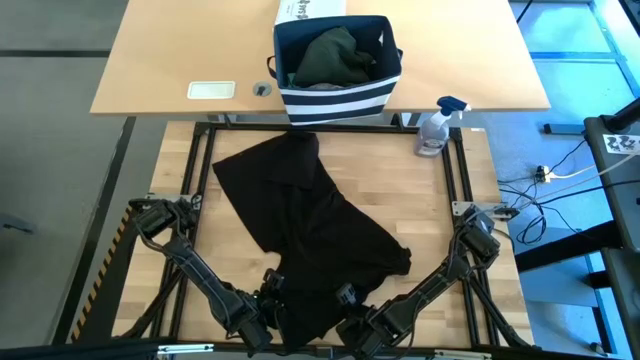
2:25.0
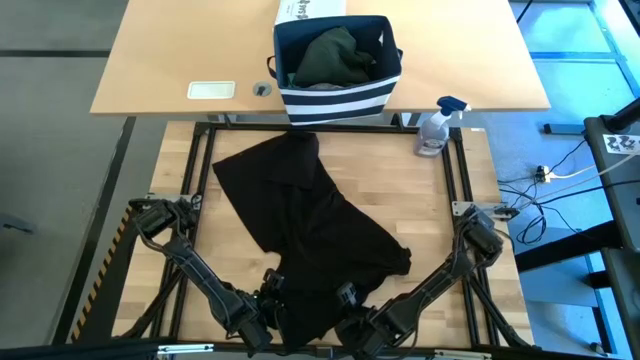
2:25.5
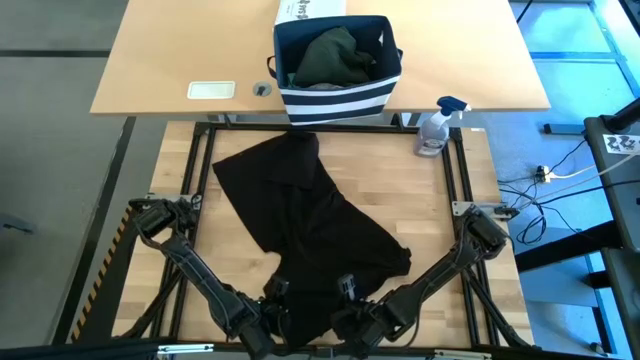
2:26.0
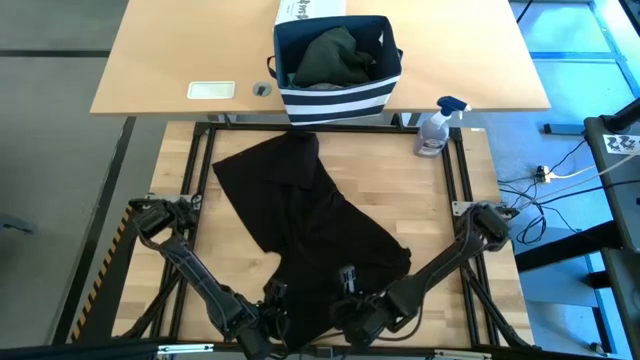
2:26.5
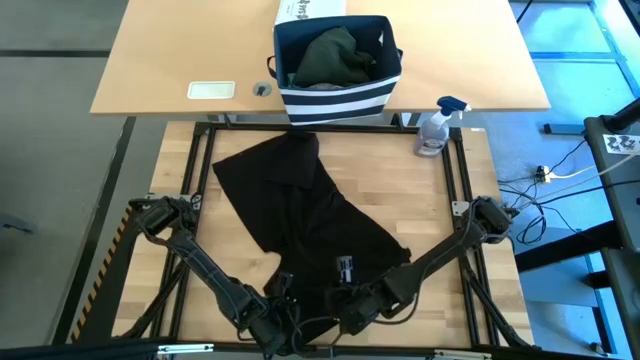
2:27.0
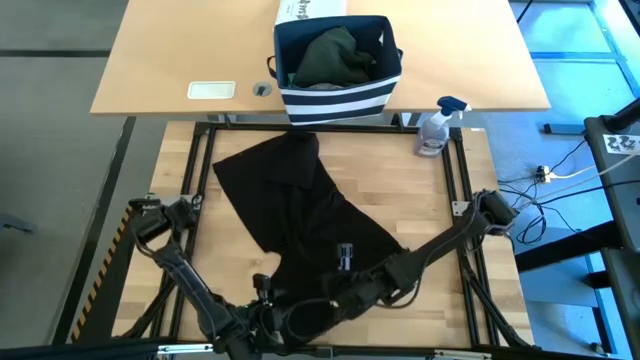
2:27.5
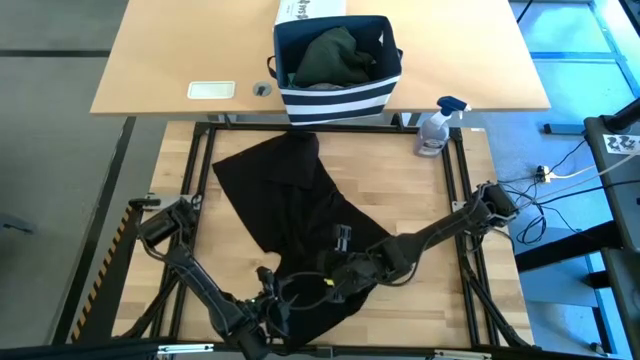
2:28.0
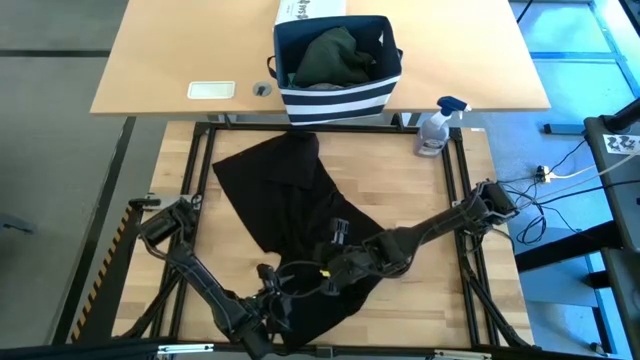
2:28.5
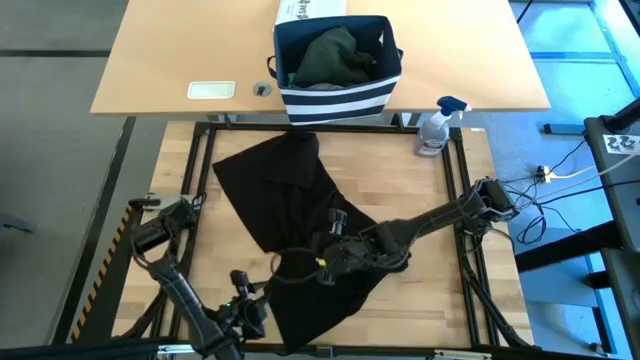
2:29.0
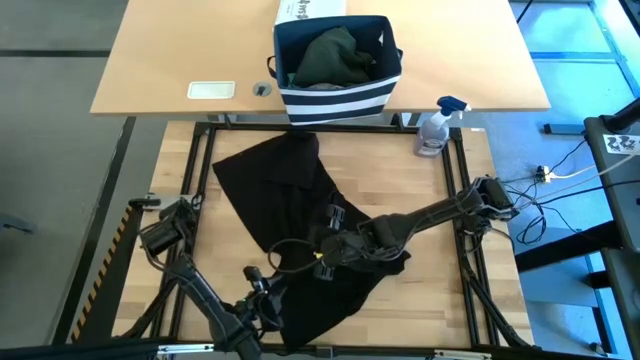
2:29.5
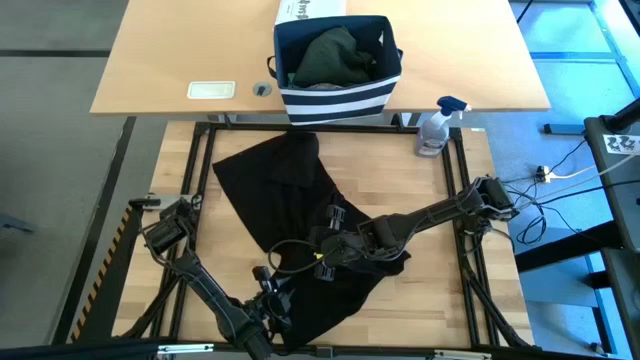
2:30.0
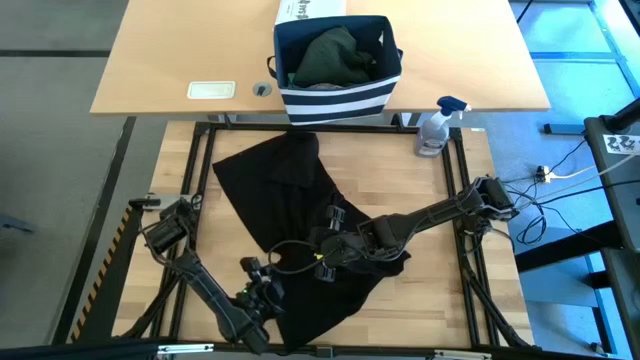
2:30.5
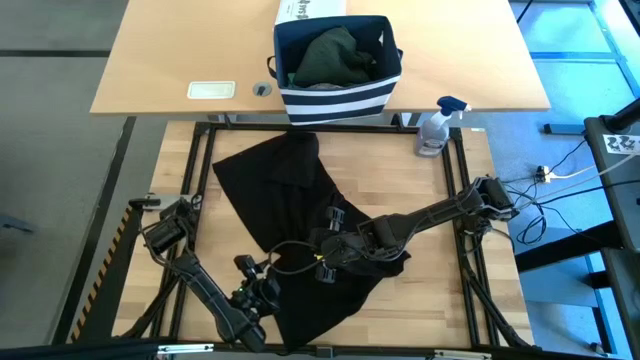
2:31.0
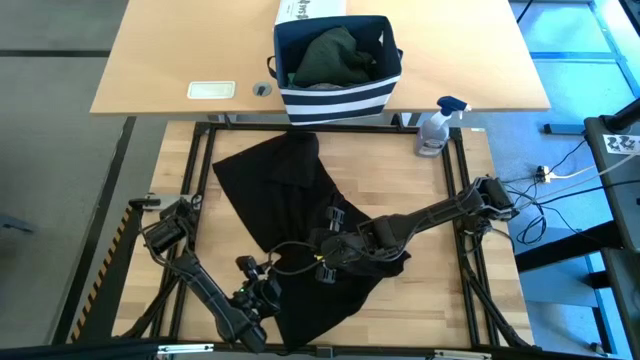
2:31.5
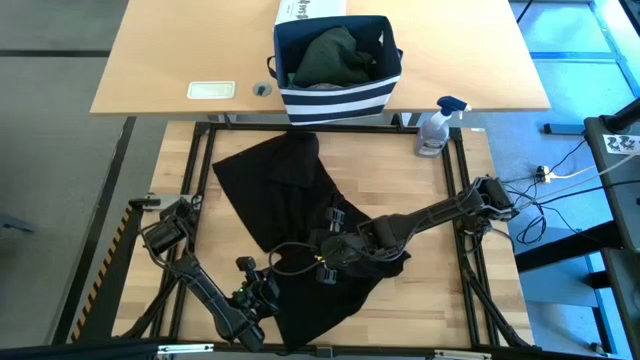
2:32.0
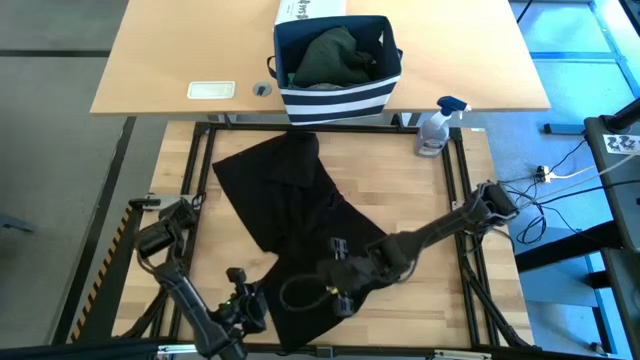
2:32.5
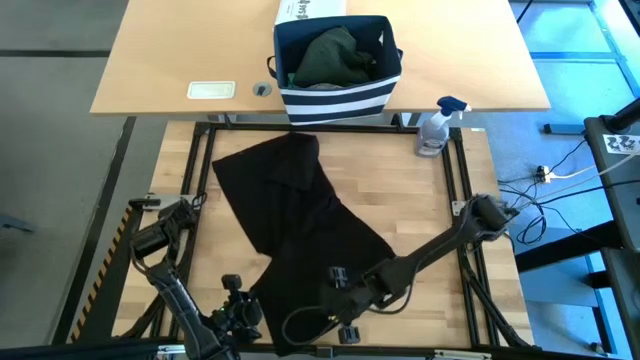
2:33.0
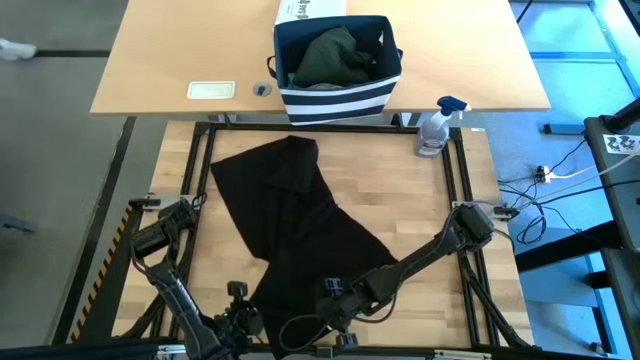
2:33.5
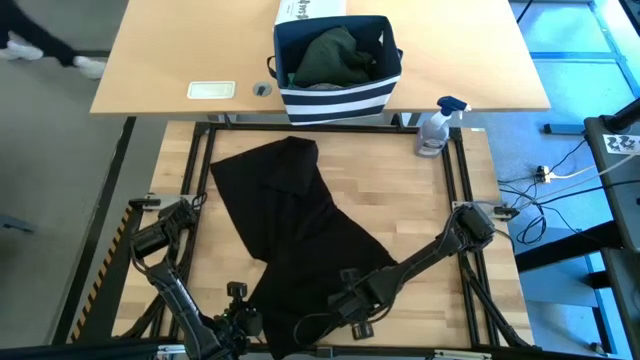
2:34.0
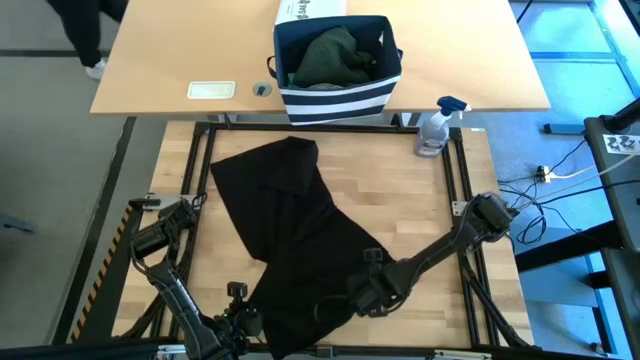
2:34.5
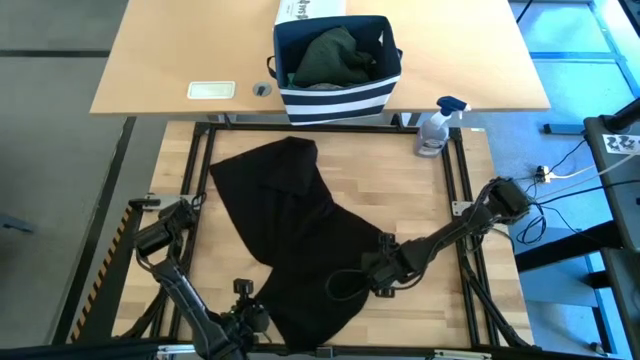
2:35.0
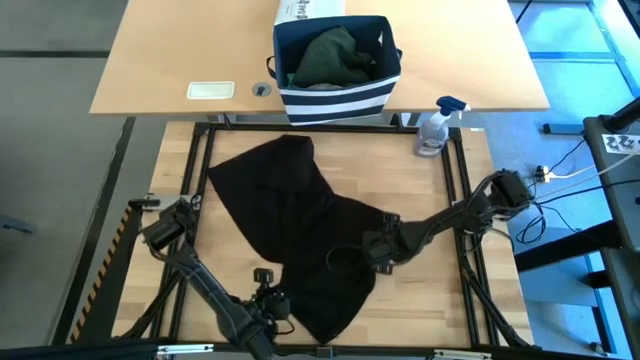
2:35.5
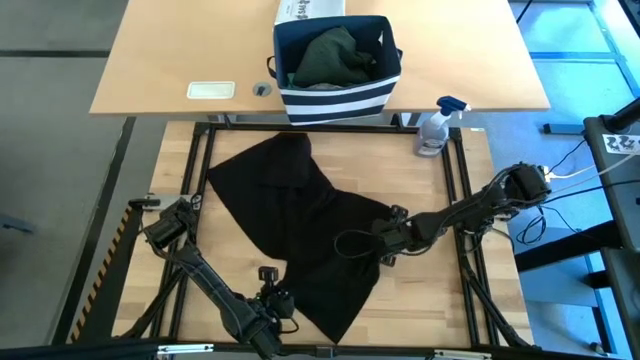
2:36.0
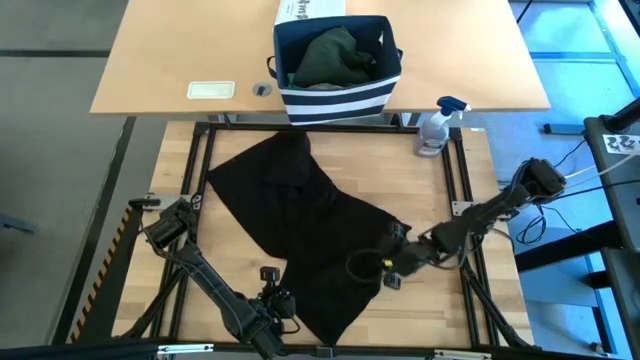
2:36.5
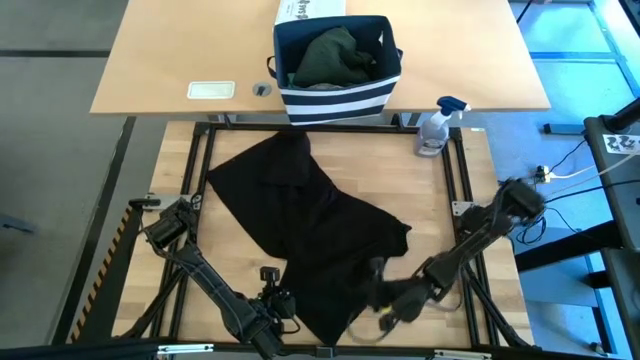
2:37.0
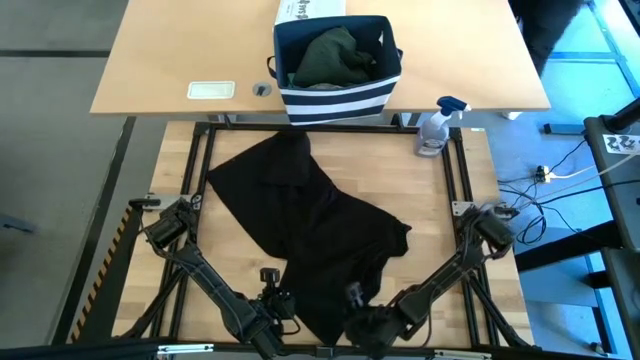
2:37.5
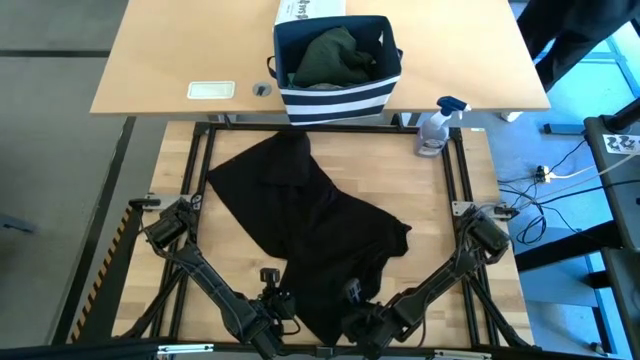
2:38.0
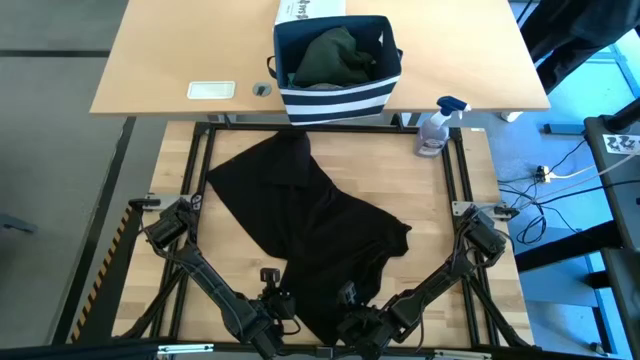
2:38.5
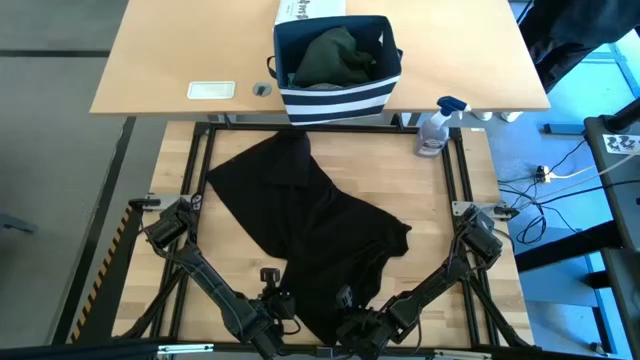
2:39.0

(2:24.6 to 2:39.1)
Task: Fold Laundry from Bin
Fold the black shirt

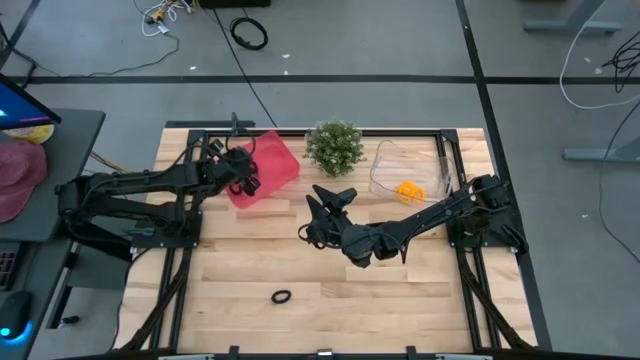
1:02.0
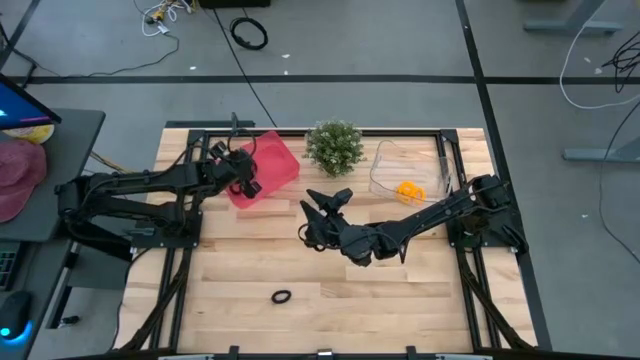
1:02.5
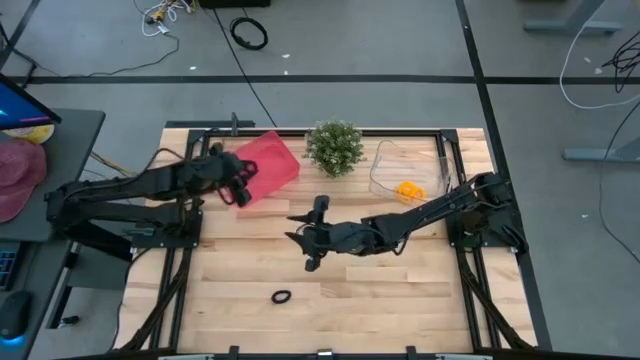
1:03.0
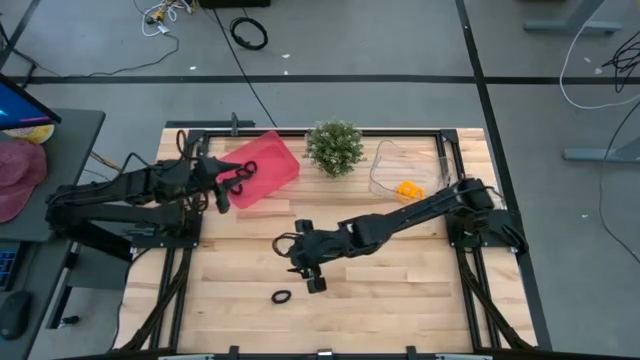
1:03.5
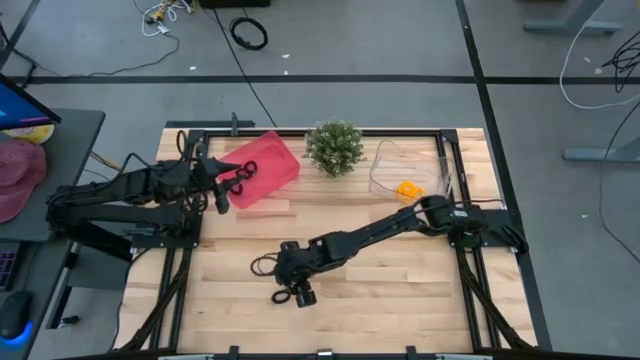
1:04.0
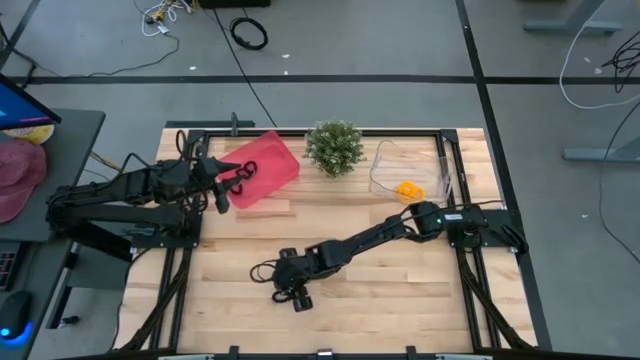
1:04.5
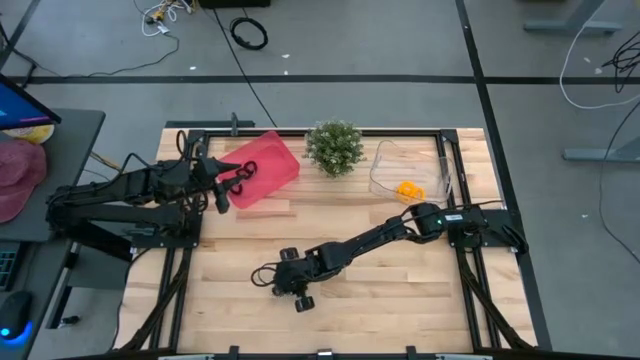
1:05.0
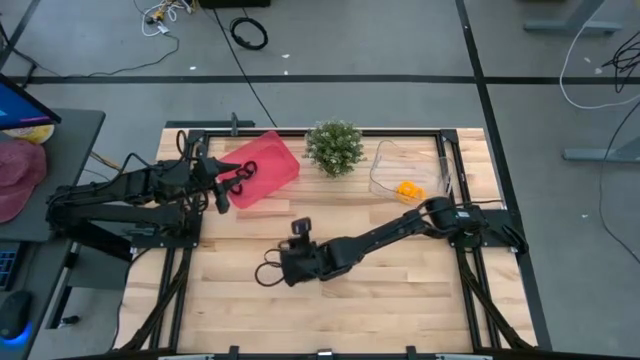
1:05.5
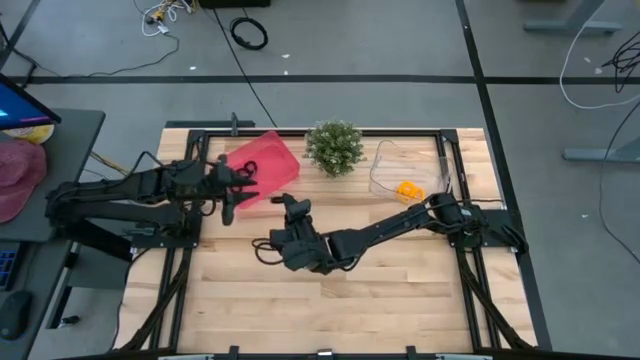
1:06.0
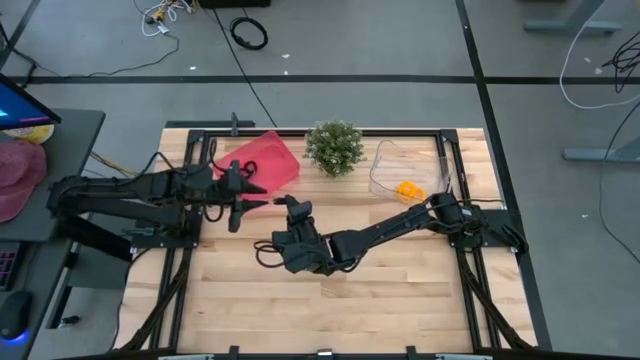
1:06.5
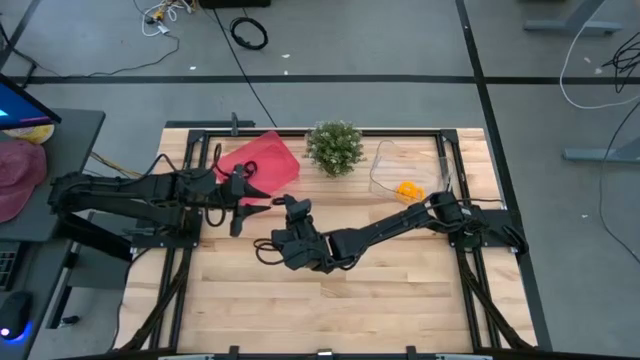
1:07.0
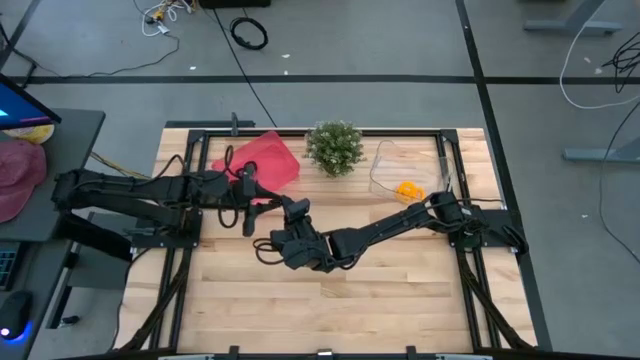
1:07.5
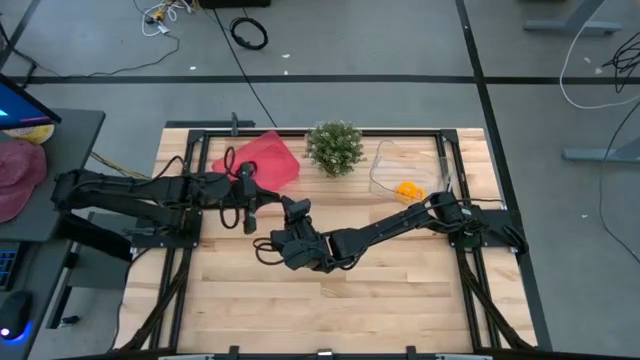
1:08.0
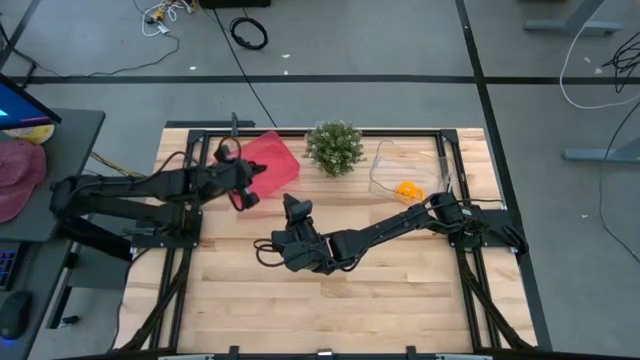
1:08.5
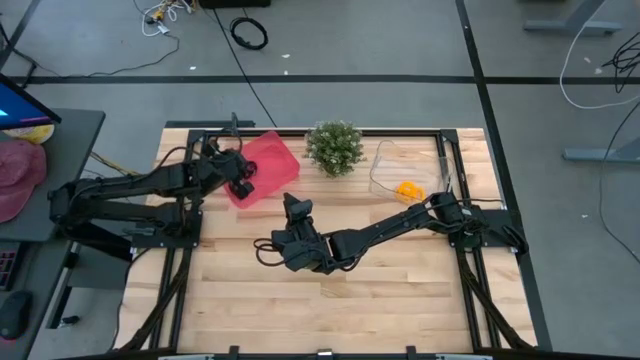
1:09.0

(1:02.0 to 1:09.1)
Task: Sort spring keychains
Put the black spring keychain into the red bin
